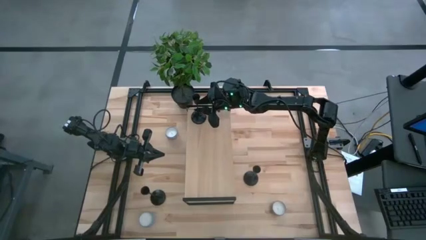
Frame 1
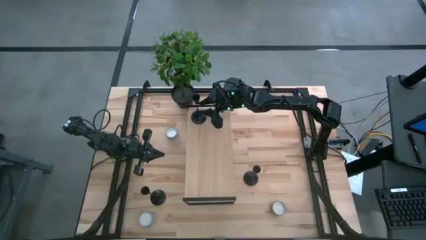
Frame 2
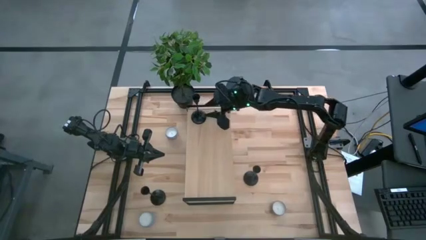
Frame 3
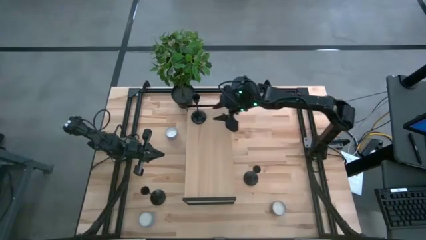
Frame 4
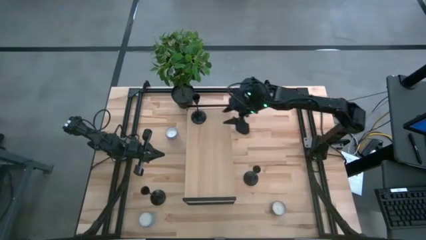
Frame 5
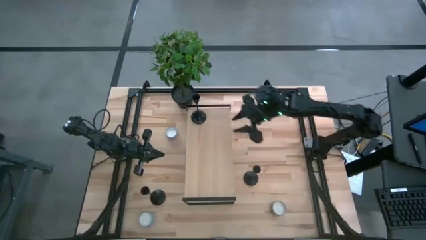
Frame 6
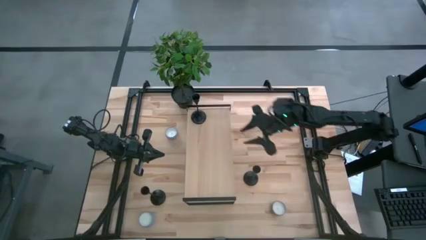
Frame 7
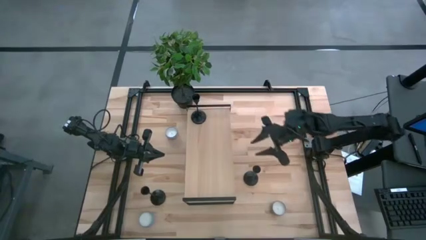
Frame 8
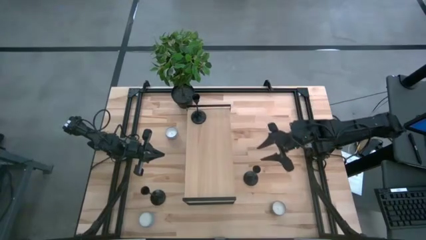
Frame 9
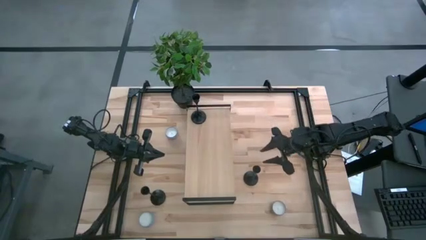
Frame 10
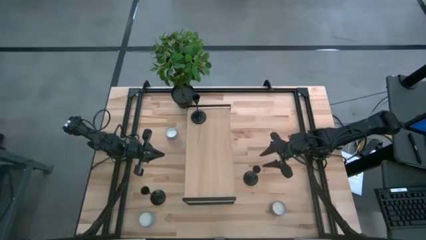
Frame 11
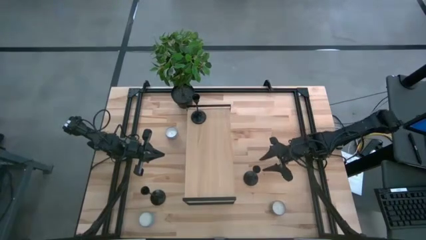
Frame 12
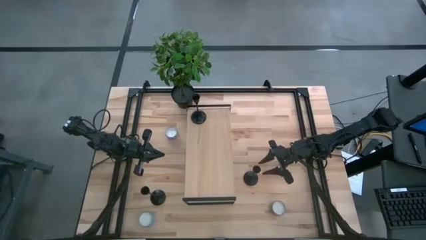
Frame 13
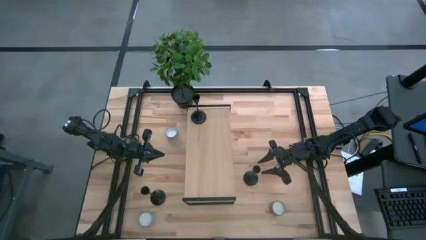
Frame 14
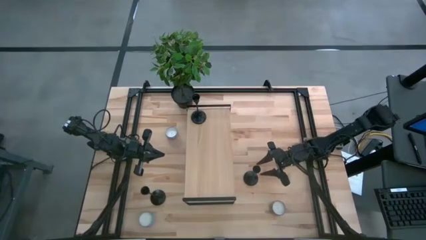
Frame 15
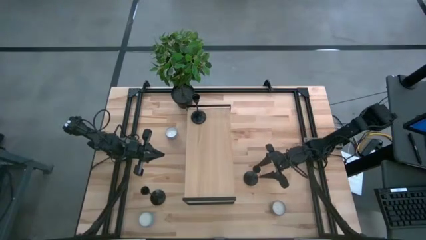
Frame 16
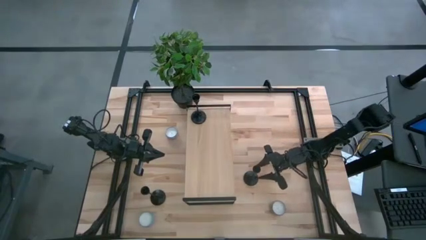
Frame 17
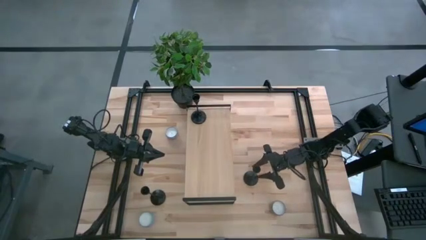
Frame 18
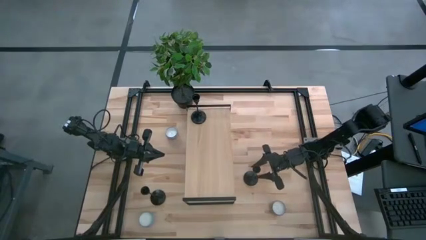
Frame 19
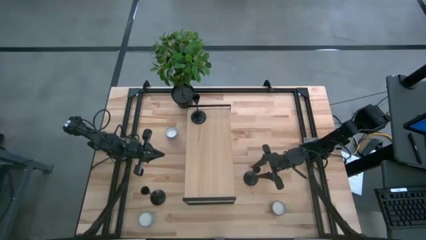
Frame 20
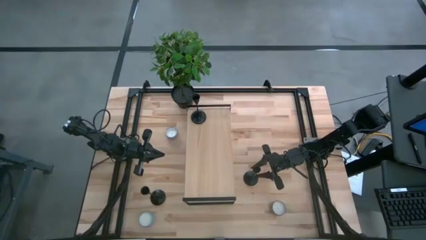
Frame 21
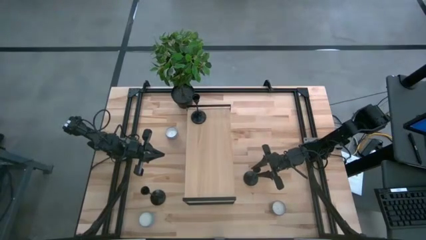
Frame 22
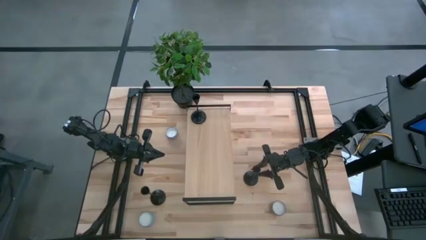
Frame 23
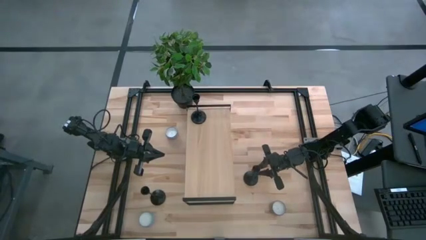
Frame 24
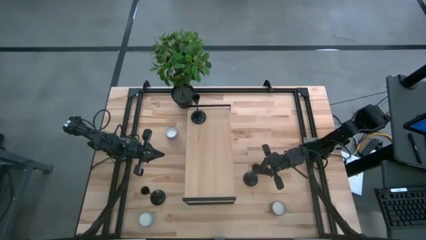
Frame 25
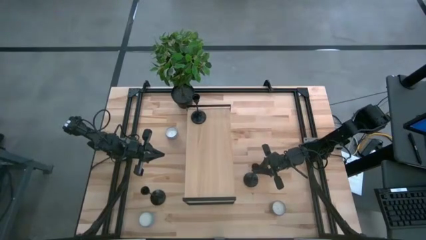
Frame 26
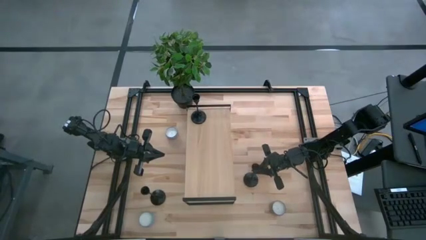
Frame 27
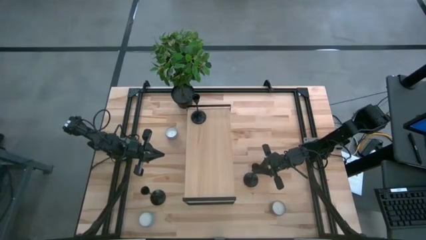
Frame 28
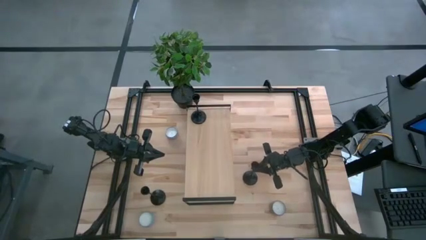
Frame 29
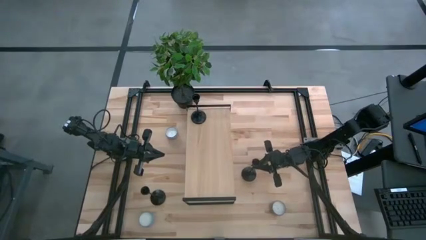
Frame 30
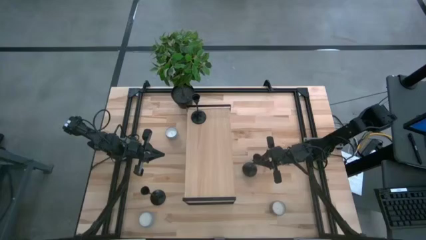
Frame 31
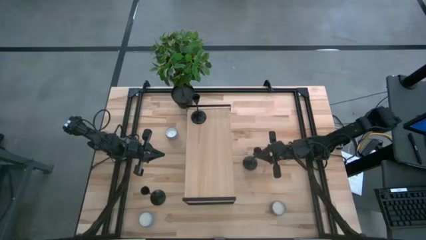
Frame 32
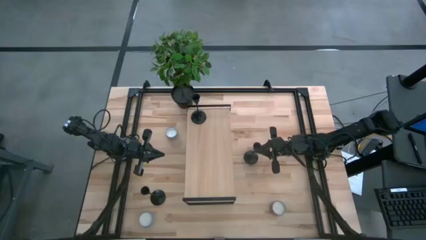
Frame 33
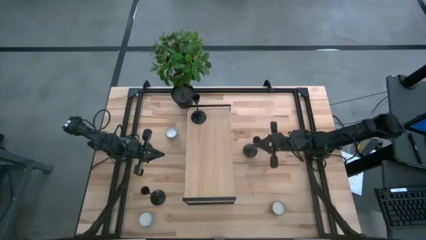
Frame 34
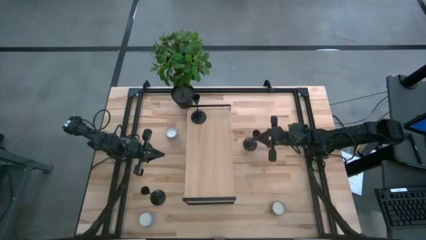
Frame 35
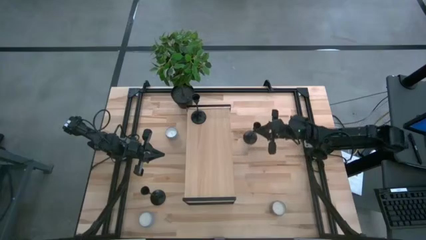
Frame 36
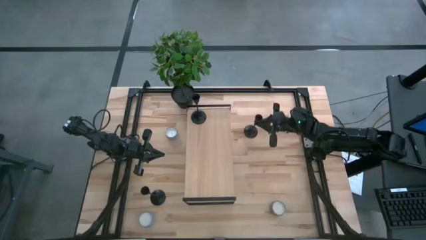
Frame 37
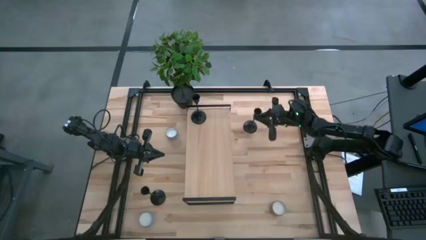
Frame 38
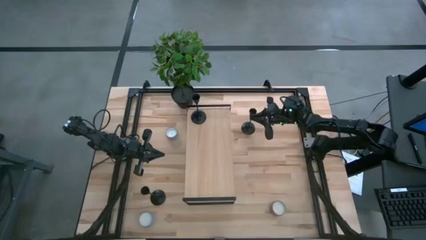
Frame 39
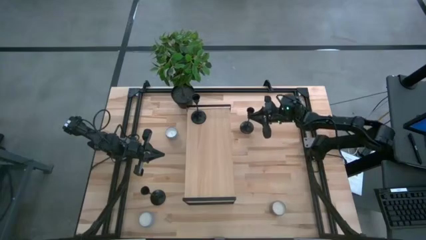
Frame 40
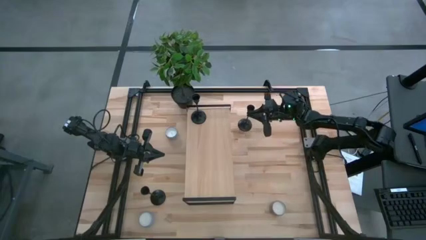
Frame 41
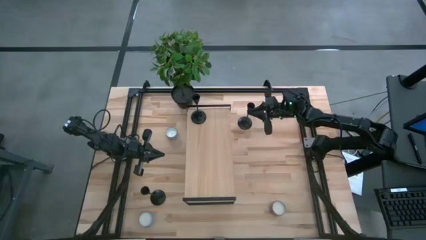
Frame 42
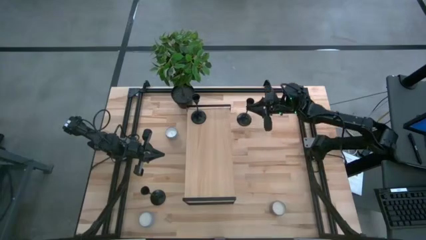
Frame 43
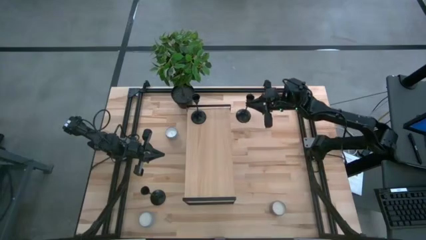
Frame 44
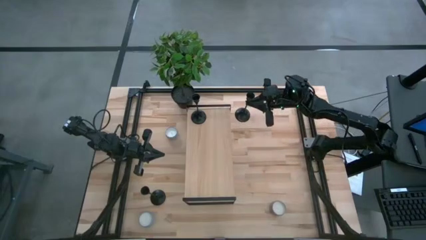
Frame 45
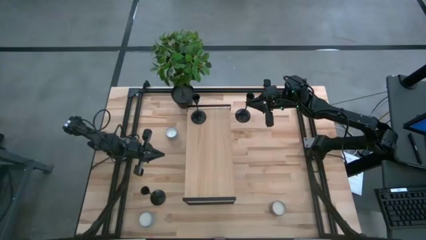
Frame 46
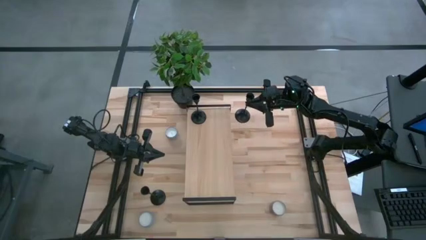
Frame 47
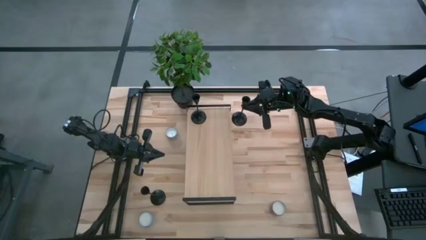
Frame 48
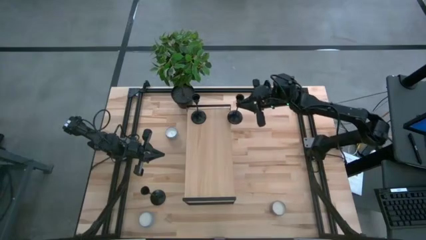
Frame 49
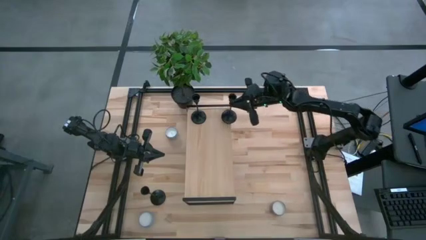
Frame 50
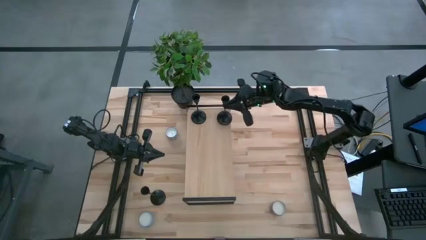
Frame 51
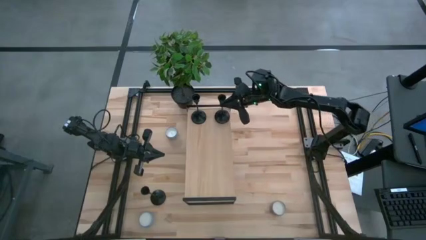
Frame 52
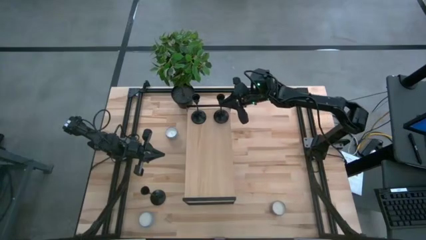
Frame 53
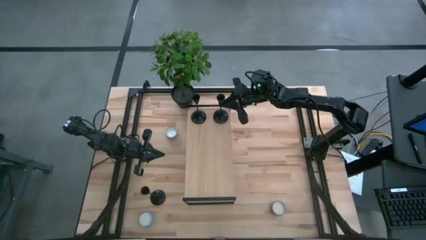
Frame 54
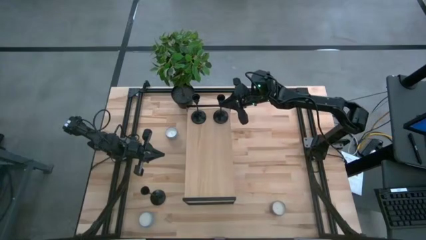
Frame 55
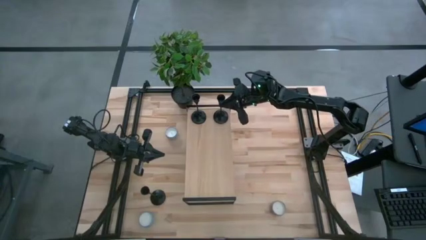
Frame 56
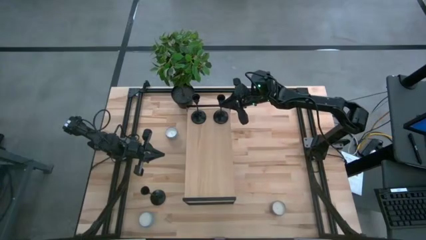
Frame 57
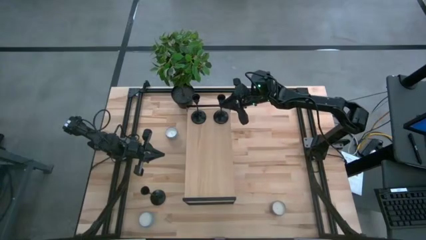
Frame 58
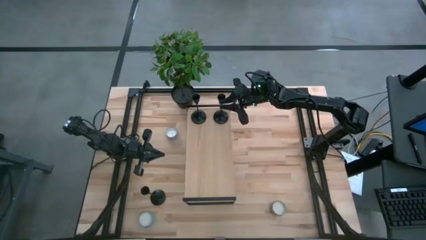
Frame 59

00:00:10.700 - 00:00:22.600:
Task: Pick & Place candle stick holders
Put the right black candle holder on the shelf
